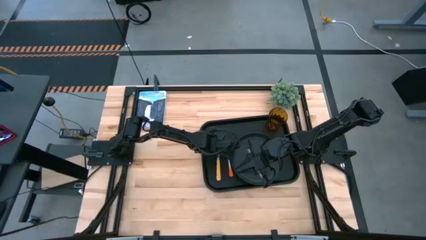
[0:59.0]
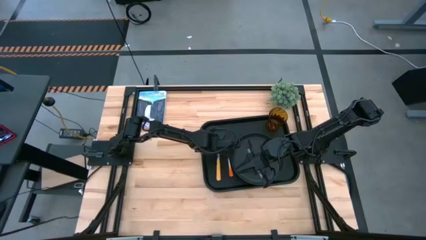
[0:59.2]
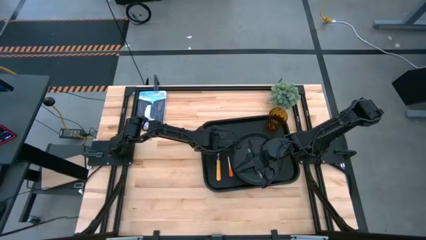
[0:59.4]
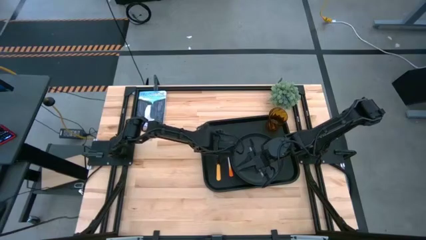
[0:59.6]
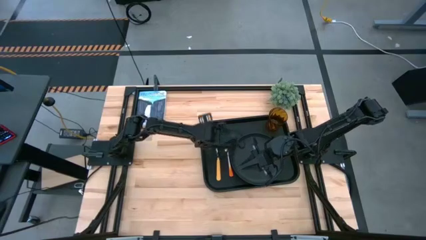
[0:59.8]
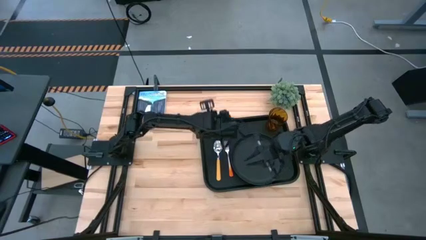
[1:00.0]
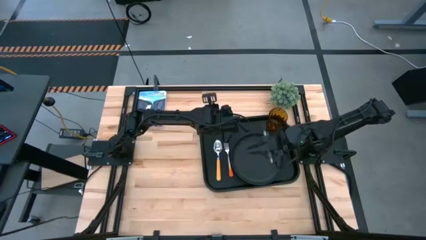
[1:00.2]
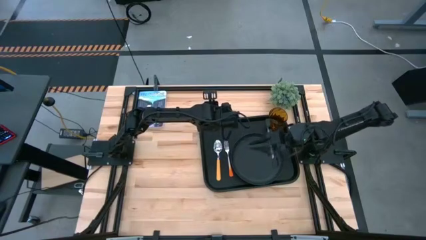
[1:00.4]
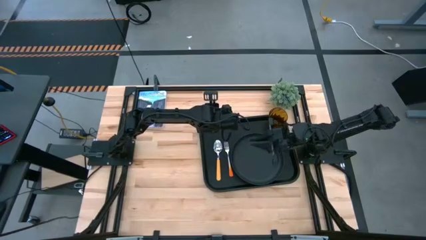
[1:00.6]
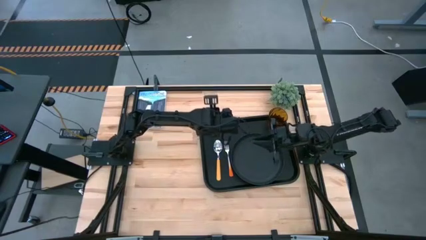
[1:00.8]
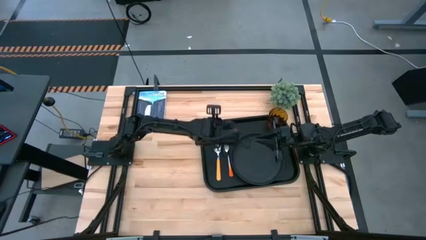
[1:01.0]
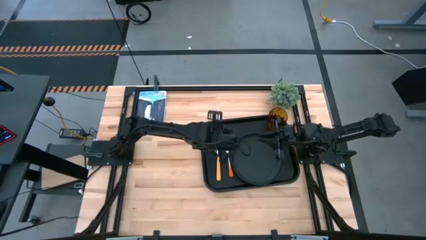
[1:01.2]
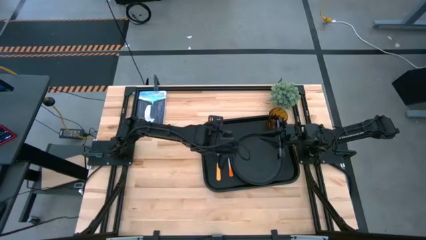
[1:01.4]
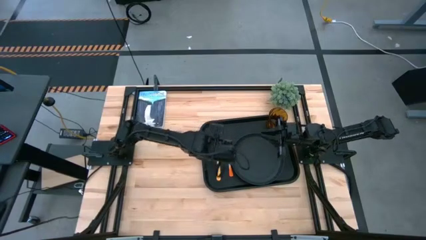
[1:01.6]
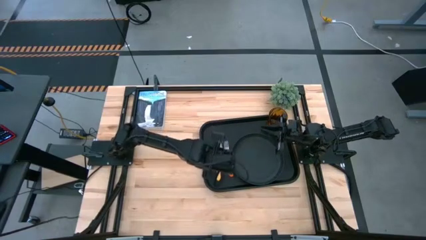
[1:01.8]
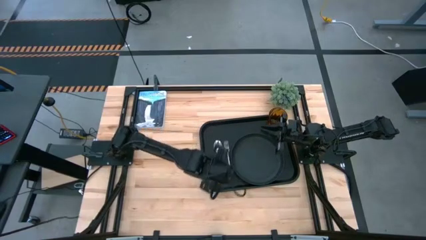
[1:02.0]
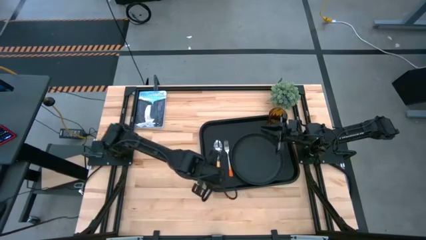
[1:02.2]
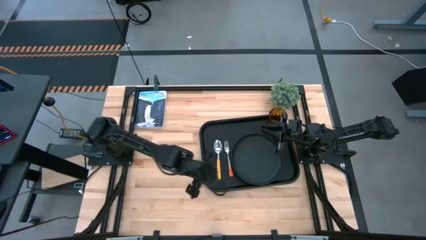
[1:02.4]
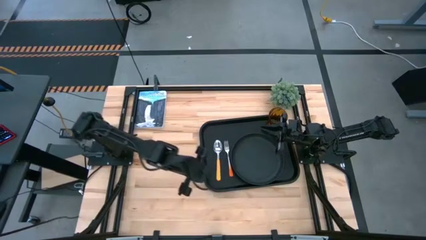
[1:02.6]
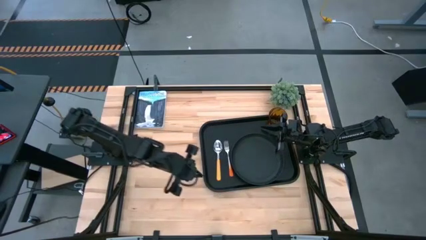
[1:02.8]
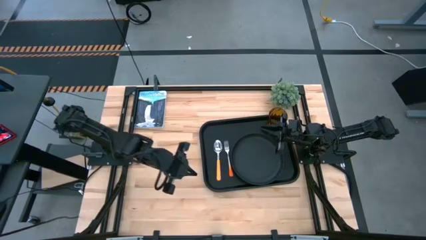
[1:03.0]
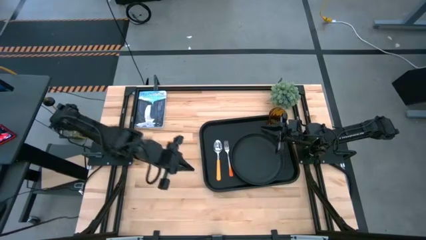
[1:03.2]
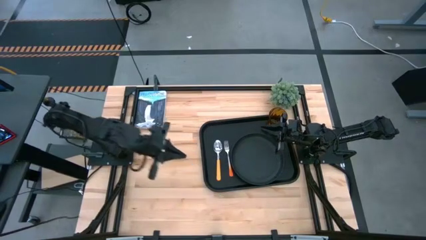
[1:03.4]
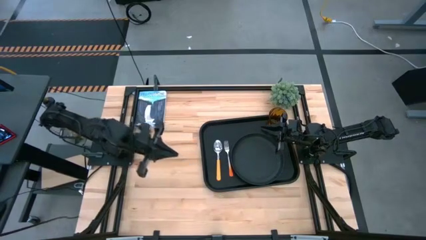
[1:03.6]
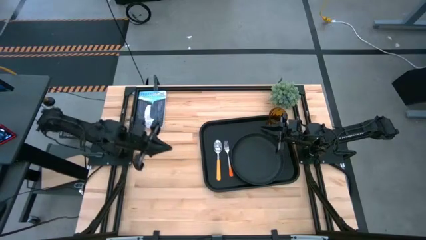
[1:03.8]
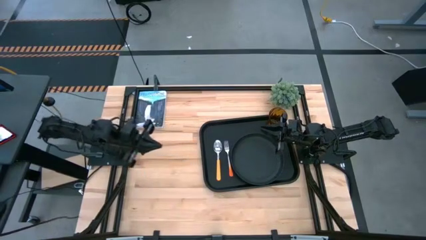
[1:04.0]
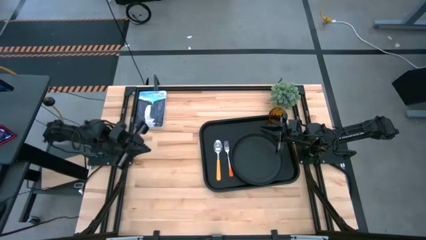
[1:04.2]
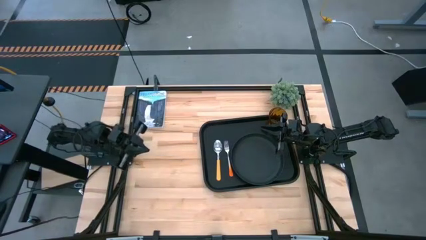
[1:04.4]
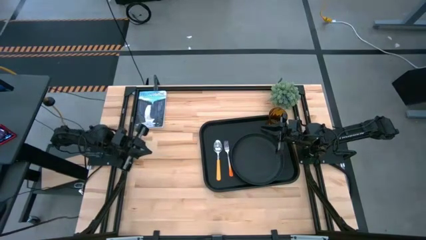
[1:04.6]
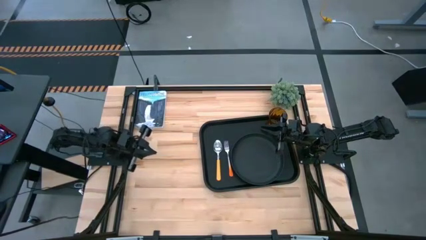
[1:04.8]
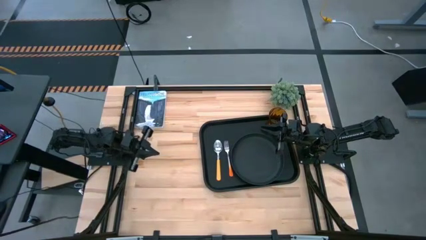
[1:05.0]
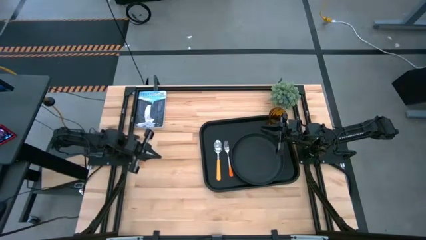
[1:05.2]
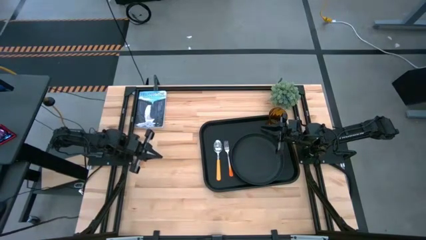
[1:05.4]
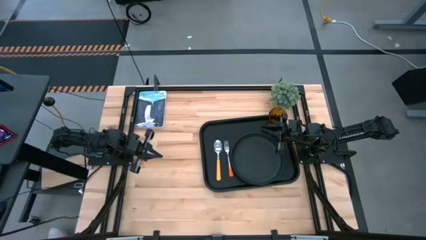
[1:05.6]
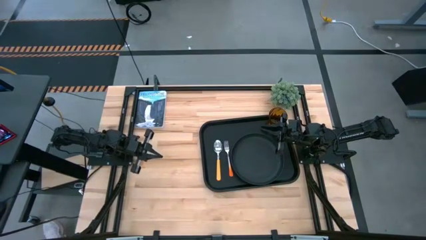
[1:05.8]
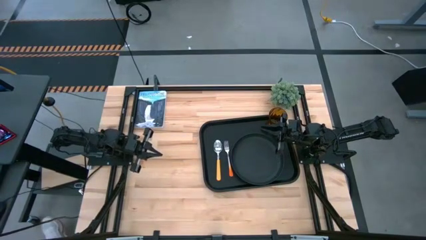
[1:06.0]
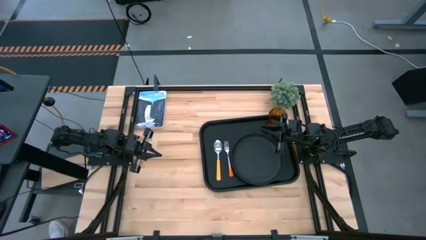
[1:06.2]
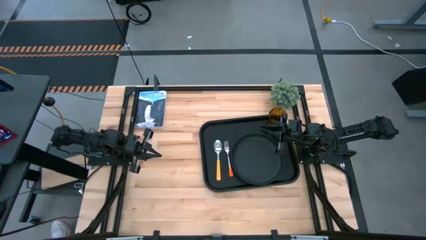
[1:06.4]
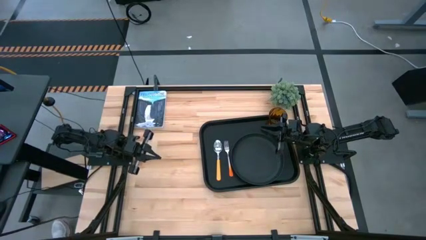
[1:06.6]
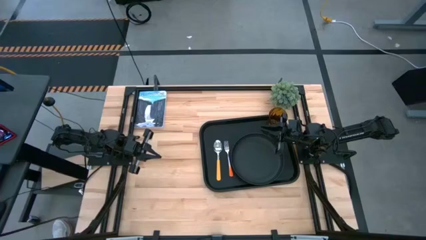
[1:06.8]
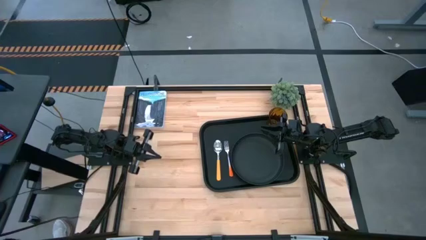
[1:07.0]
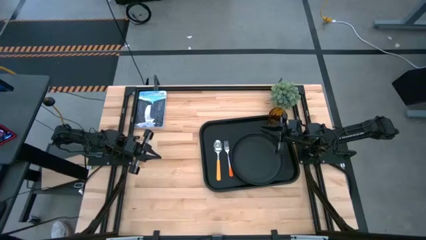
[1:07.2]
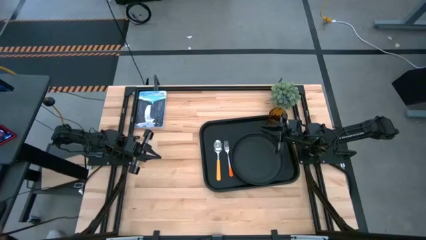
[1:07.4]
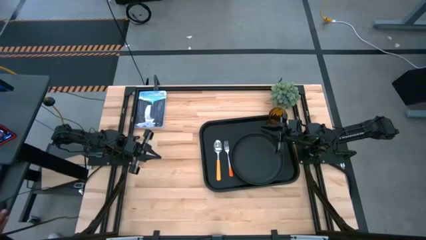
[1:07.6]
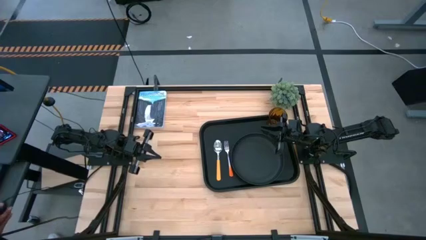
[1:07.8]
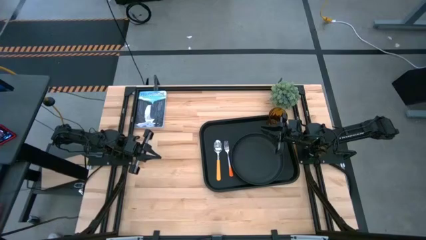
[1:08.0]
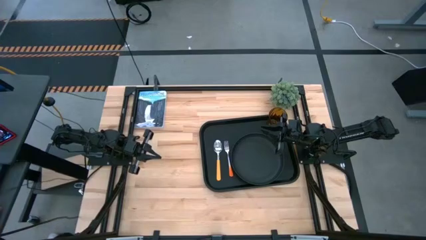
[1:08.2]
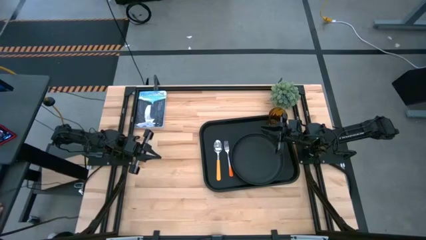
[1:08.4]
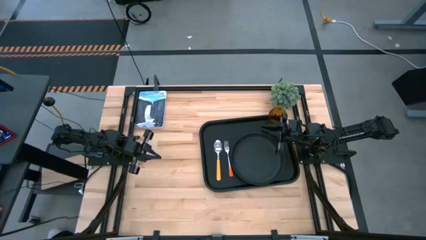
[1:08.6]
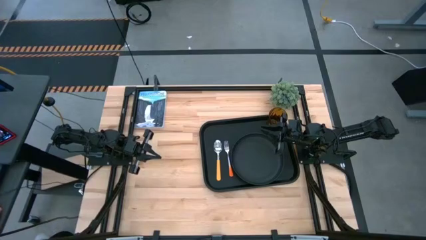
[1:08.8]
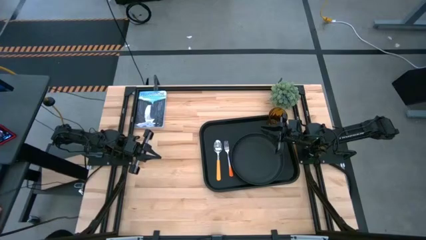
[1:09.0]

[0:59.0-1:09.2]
Task: Pick and place plate/cup/fork/spoon on tray
Return to Home Position

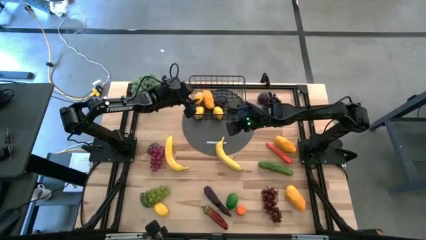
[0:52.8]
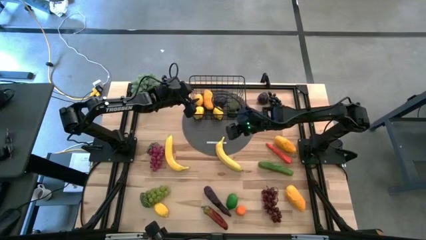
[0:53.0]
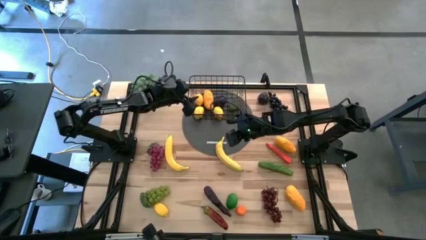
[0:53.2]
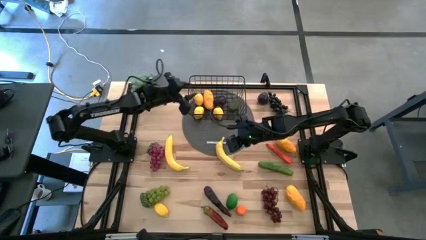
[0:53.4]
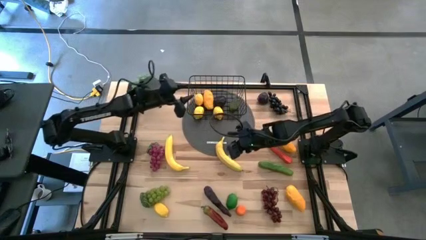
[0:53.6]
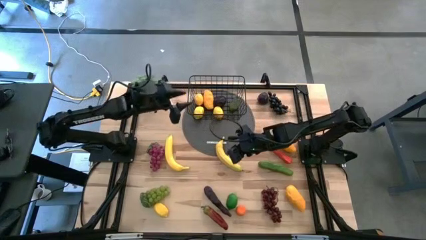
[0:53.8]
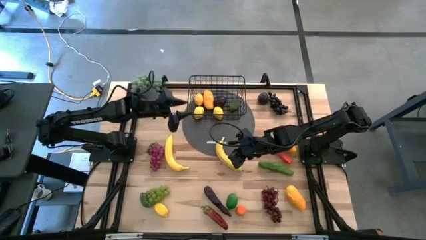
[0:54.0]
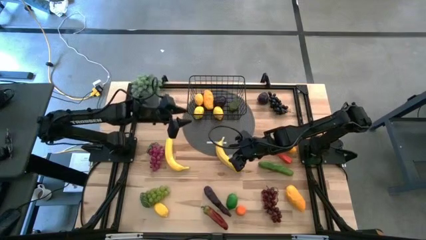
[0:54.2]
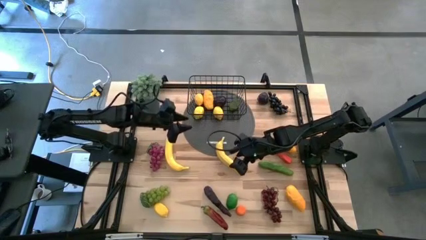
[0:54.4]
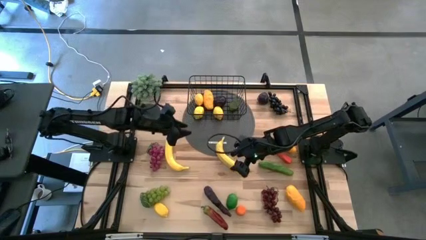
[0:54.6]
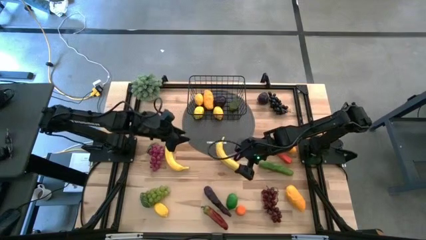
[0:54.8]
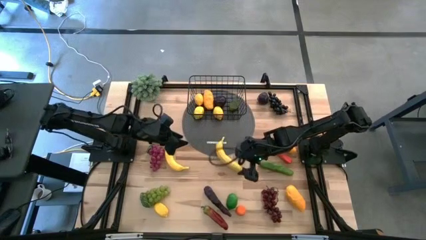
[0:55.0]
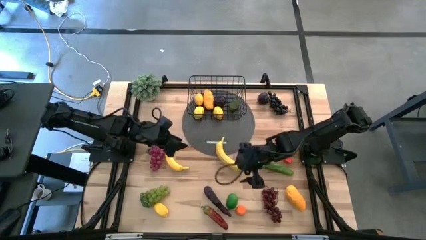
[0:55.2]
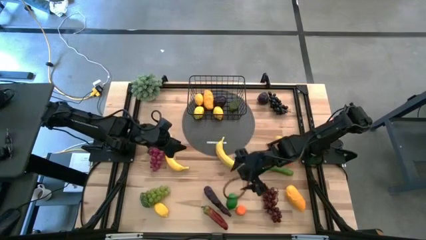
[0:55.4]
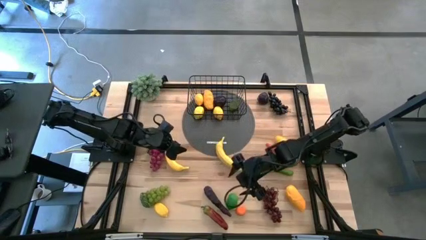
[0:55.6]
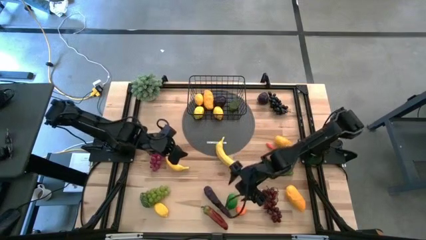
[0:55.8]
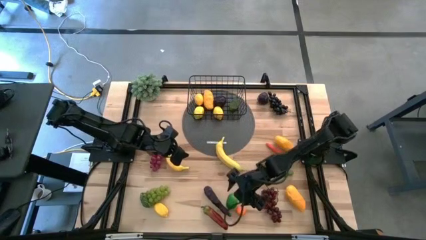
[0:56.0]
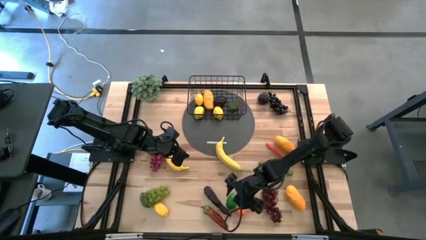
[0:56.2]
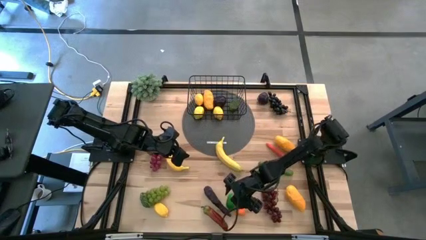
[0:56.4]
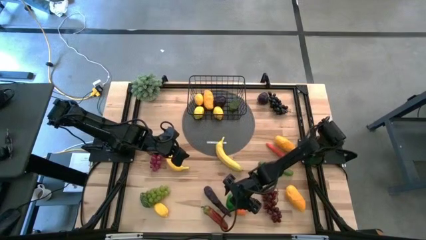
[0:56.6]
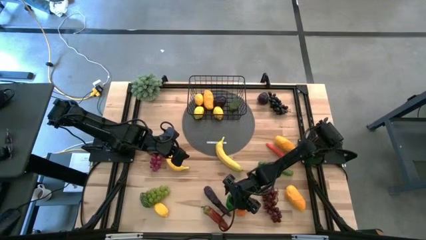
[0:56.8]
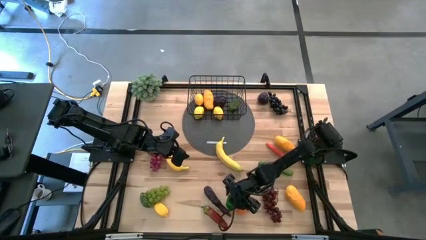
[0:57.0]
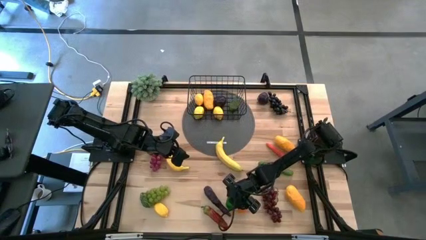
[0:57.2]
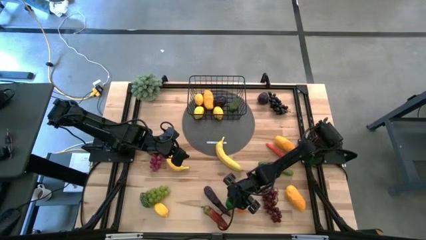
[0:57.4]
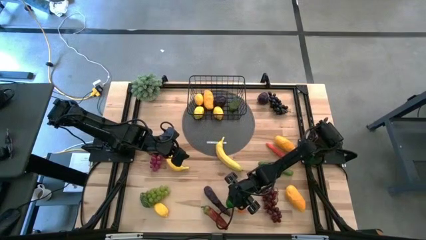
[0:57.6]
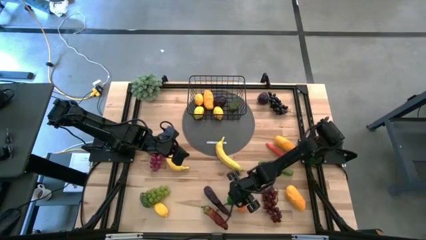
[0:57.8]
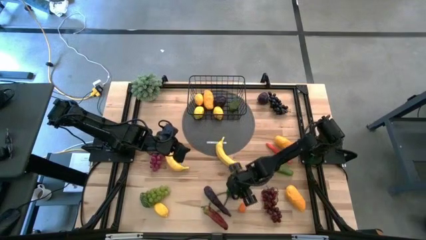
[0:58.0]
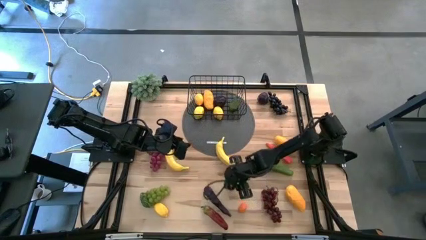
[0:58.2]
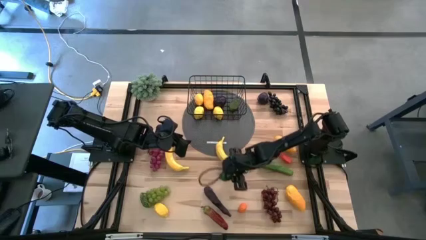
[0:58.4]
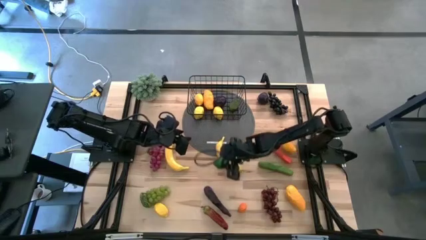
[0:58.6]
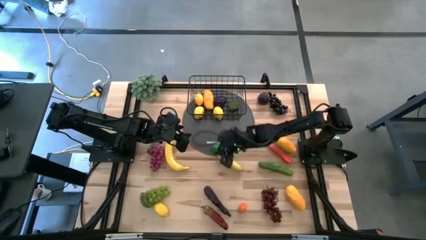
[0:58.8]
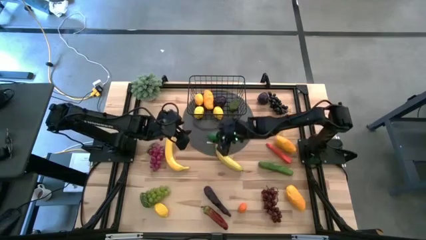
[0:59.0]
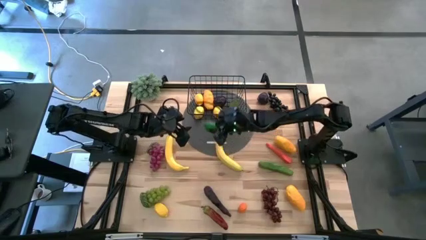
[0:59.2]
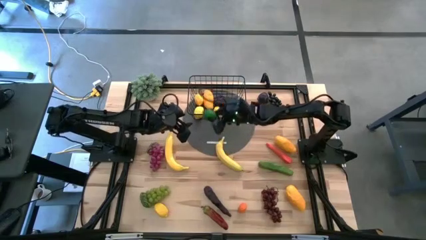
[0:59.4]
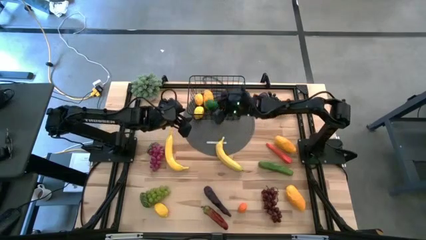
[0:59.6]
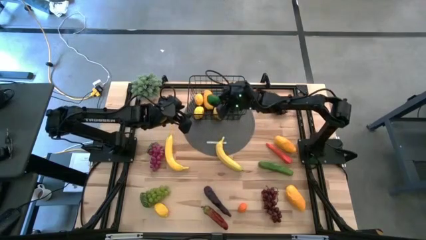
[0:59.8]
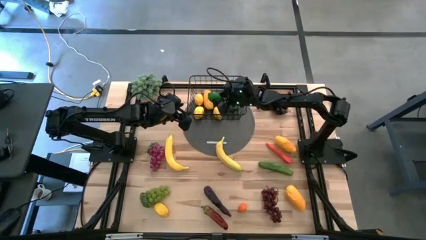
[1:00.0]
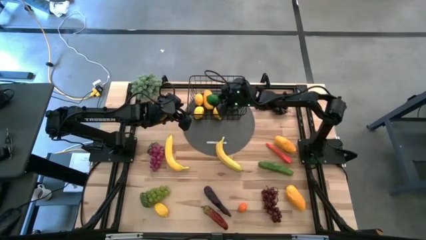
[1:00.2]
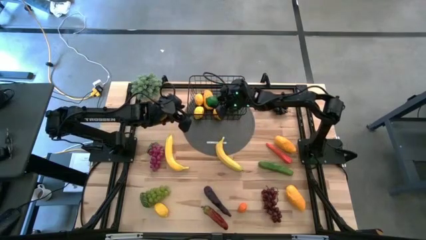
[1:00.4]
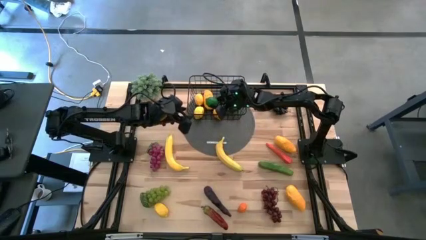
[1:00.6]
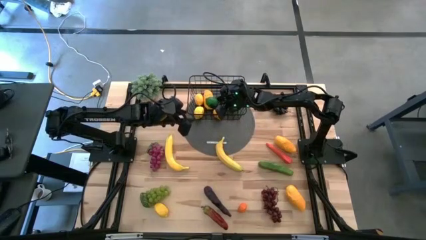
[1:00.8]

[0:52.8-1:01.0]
Task: Build produce basket
Put the green lime into the black wire basket
